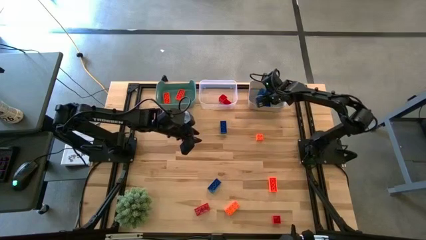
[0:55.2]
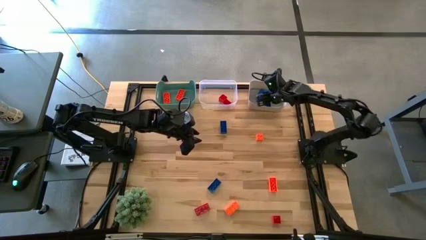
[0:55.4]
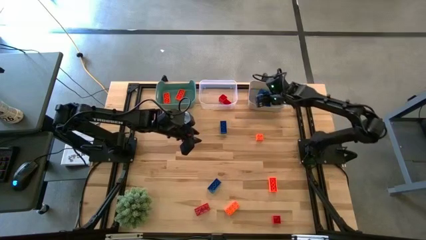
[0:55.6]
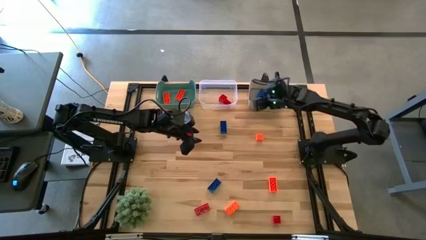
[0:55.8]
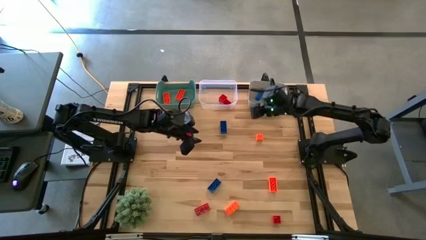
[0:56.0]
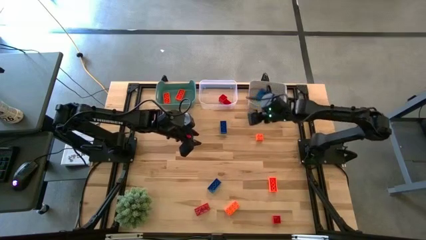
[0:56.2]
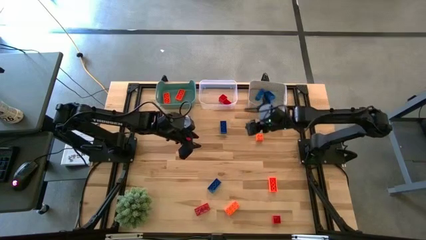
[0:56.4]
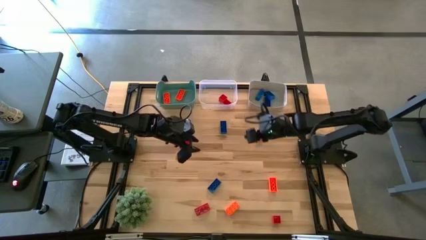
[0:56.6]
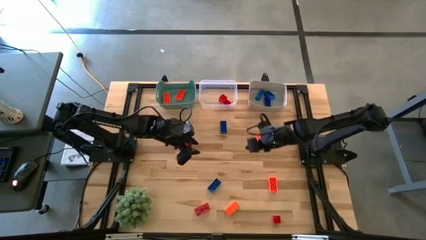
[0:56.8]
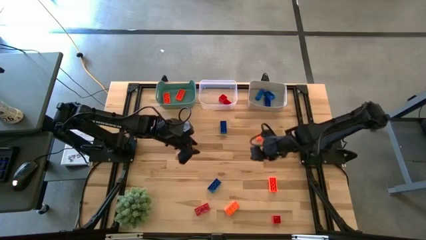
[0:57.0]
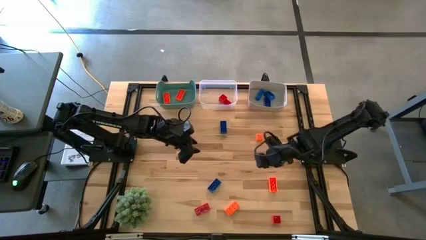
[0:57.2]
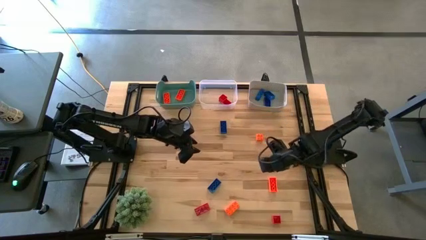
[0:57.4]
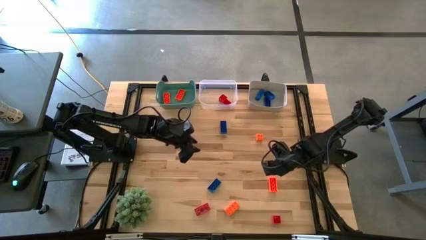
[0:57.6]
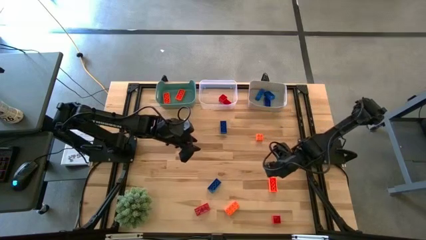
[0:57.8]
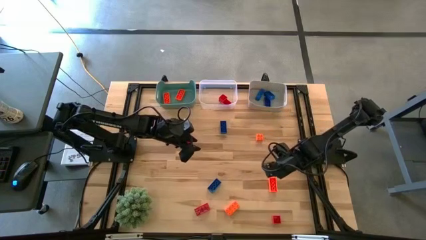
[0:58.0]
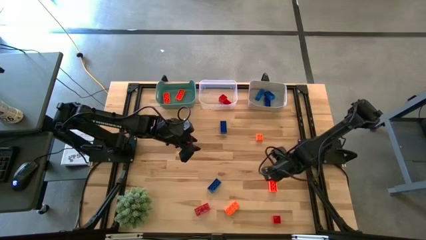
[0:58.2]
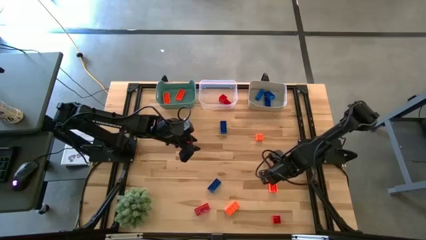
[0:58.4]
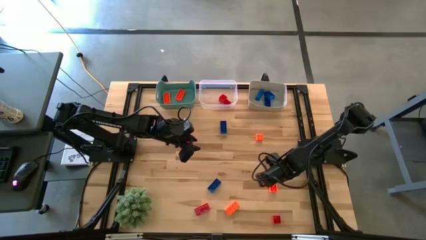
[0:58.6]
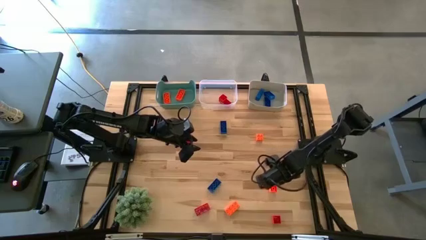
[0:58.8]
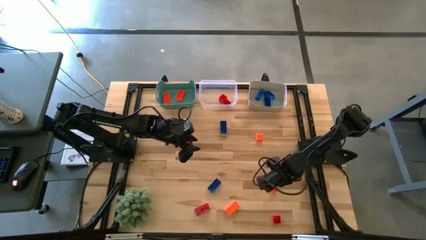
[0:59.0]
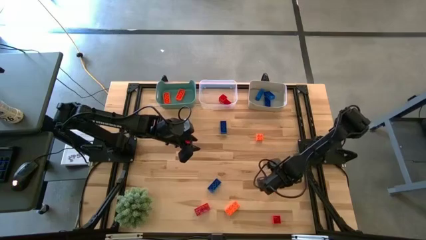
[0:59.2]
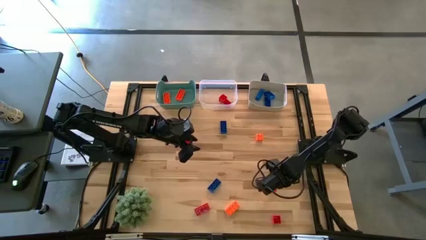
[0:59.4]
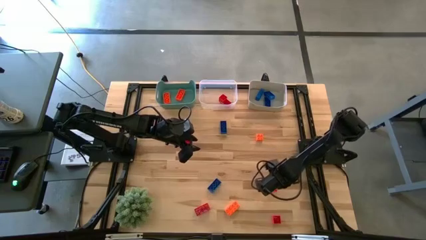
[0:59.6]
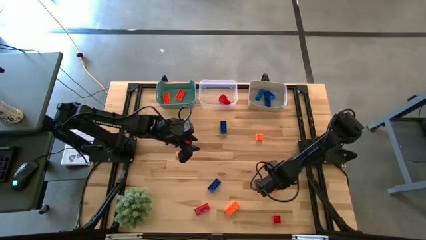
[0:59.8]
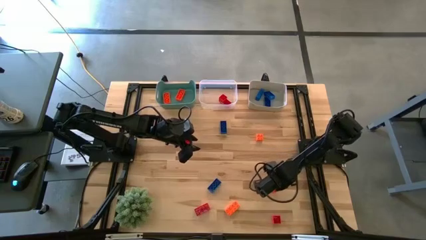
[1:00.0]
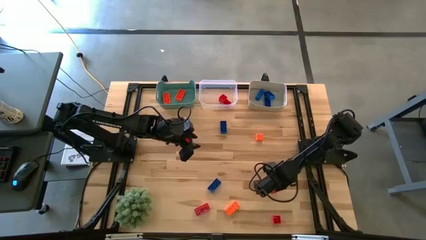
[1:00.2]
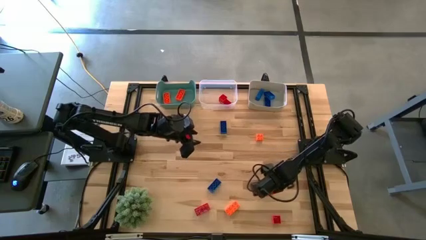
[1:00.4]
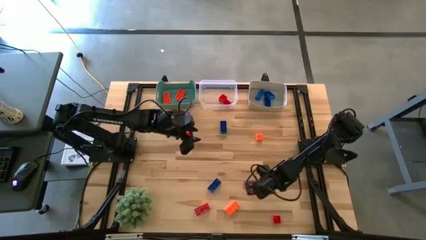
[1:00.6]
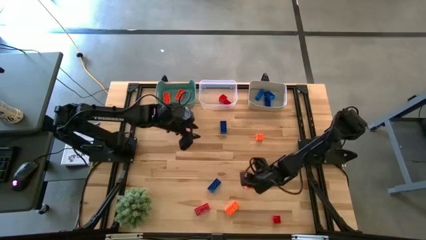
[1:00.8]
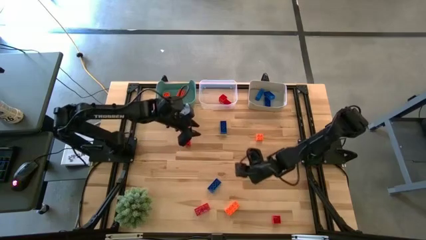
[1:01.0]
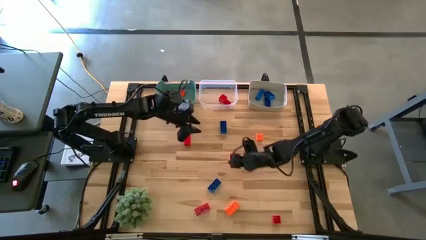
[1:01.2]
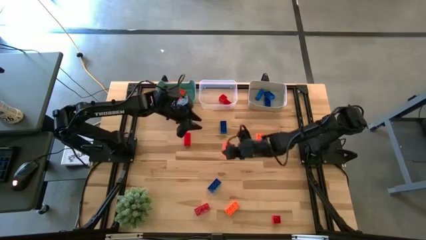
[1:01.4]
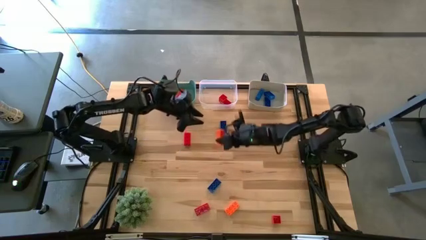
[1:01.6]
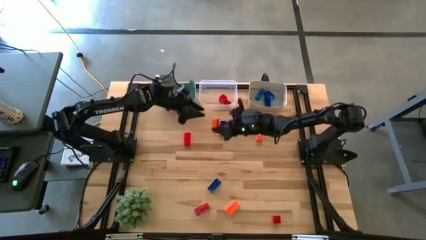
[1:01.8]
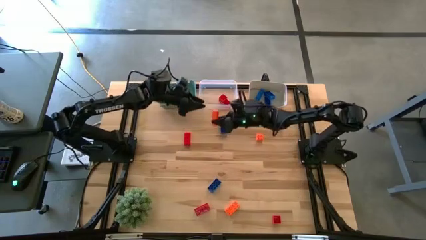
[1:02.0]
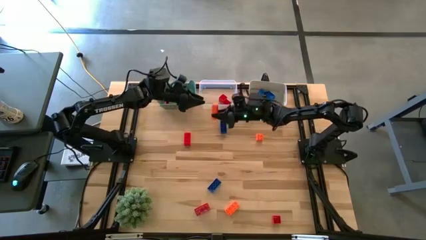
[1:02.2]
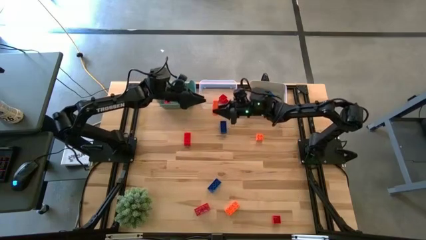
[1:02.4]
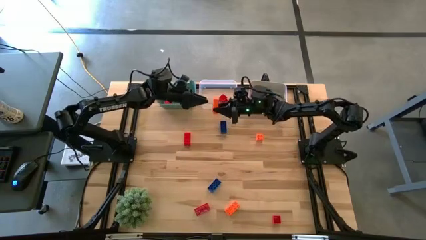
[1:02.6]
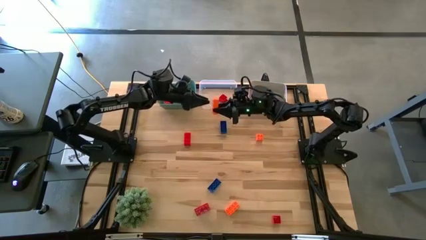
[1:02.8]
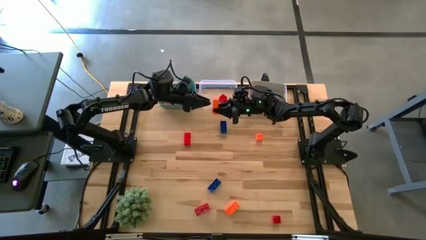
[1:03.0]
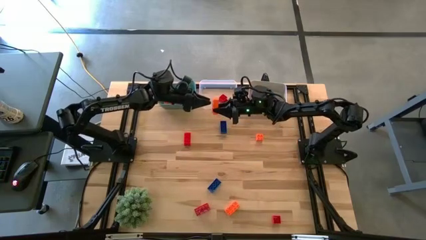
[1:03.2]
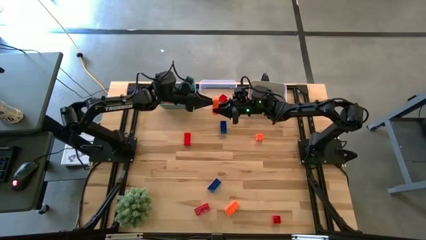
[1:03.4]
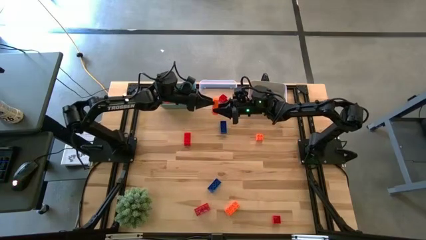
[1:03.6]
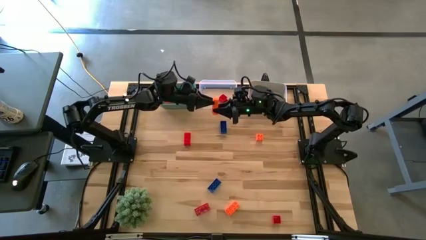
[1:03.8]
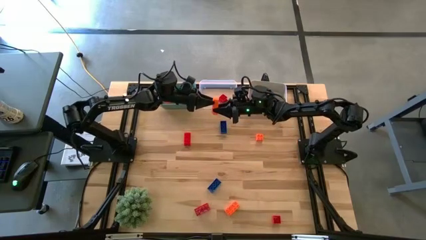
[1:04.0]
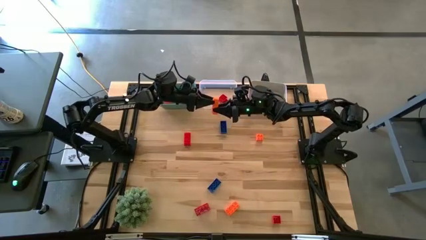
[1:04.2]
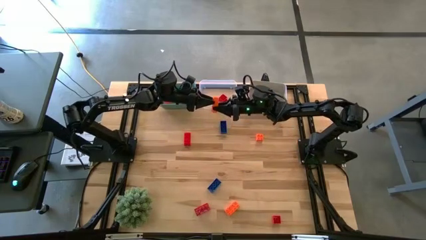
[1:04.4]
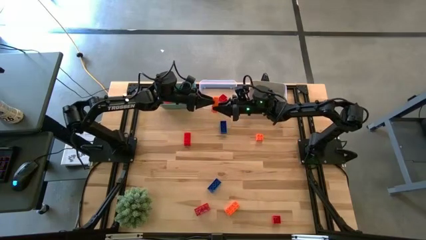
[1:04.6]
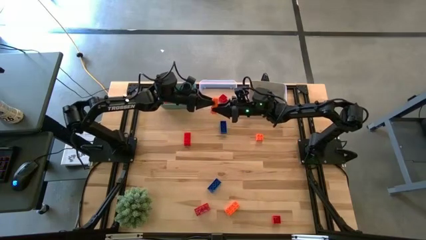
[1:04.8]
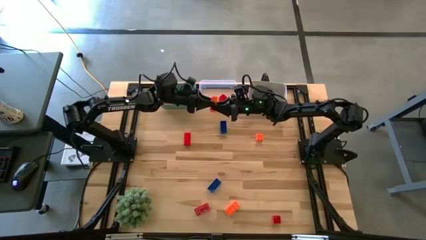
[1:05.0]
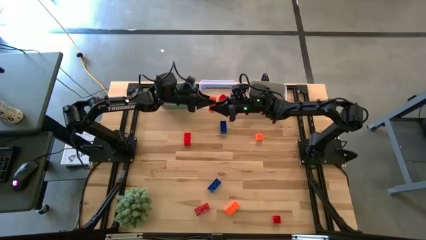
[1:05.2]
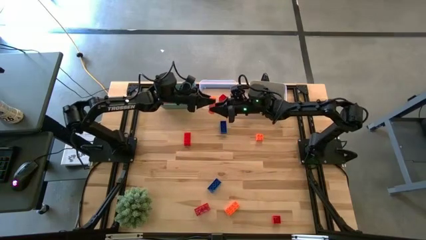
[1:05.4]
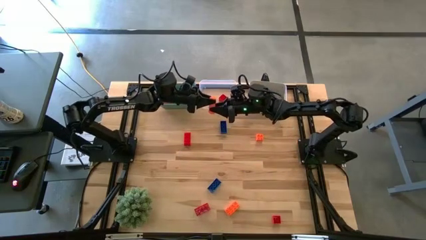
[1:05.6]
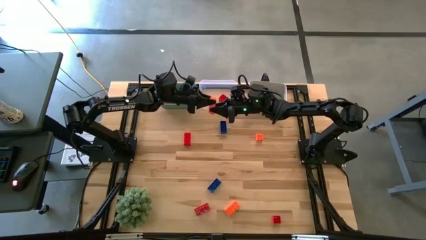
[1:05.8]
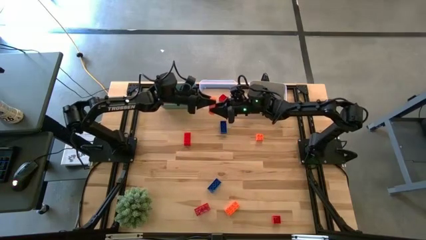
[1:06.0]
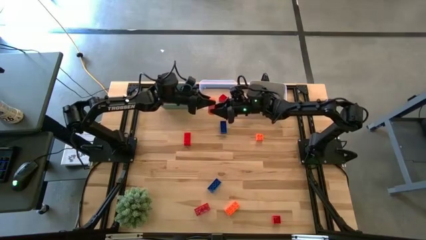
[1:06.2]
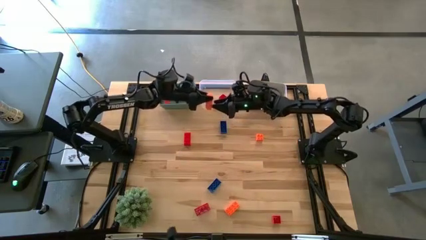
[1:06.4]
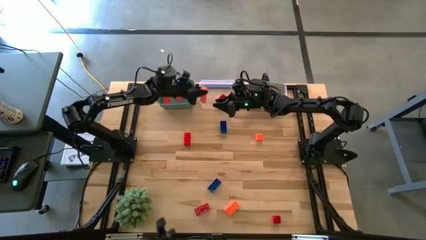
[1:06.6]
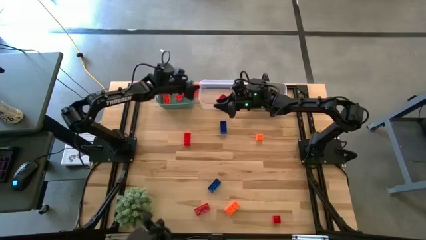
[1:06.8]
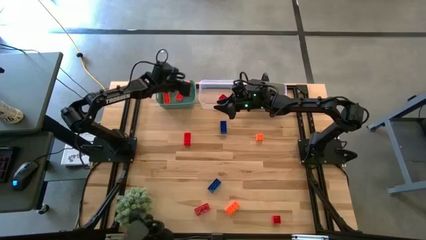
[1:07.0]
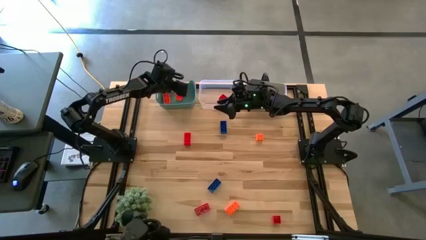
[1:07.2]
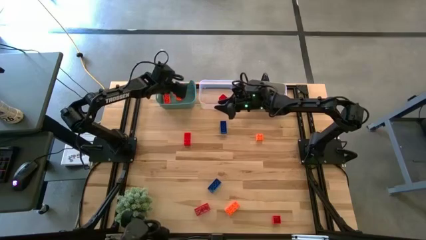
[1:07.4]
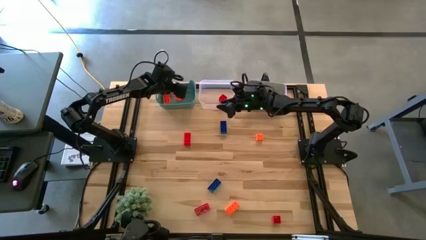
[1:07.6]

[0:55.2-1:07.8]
Task: Sort & place blocks by color
Put the orange game piece into the green bin

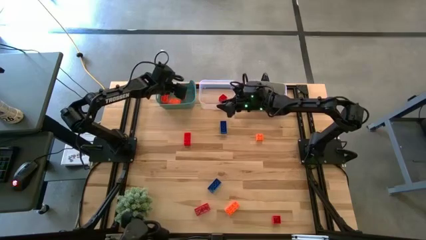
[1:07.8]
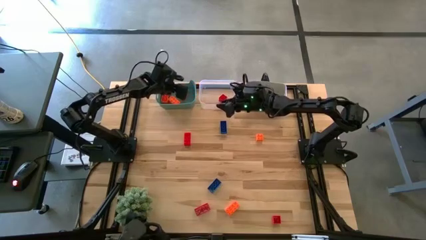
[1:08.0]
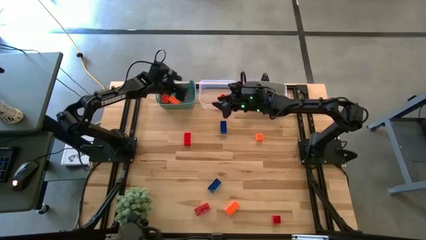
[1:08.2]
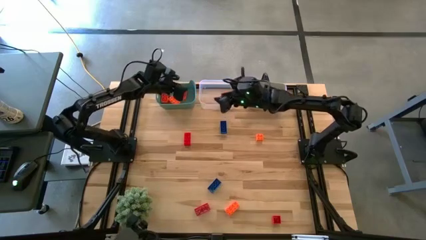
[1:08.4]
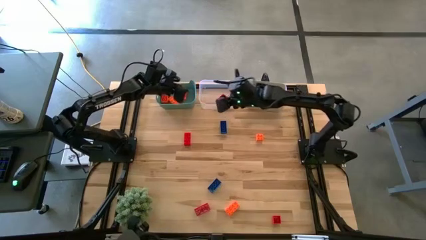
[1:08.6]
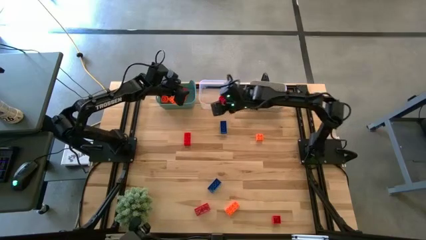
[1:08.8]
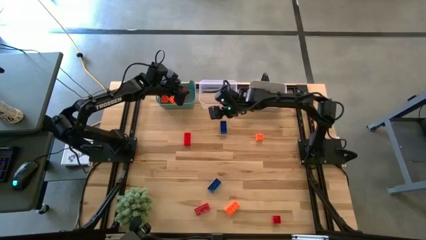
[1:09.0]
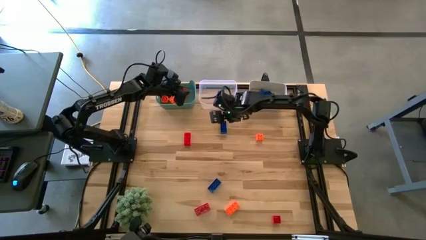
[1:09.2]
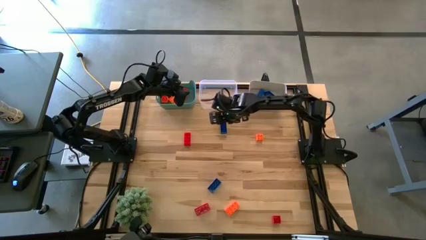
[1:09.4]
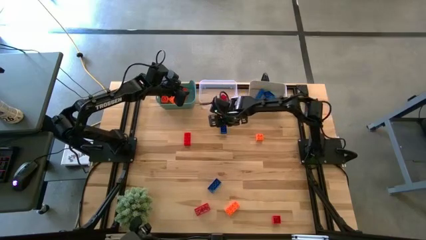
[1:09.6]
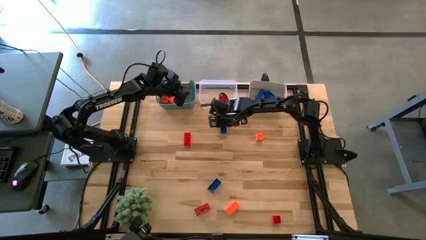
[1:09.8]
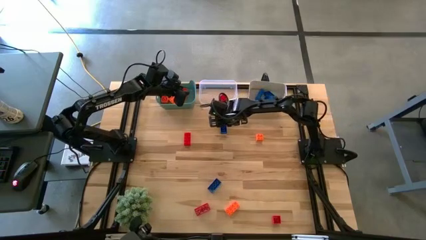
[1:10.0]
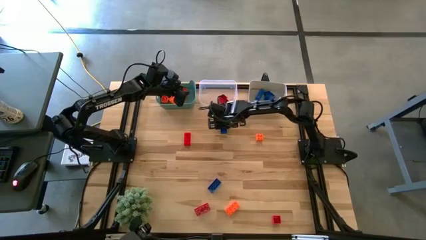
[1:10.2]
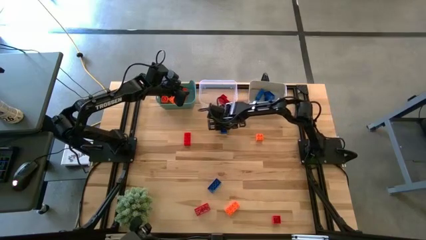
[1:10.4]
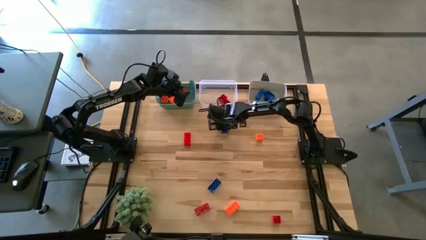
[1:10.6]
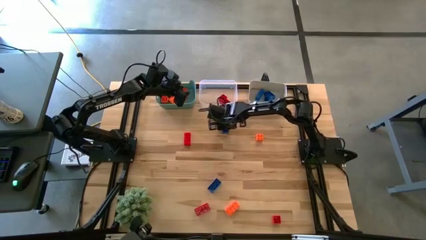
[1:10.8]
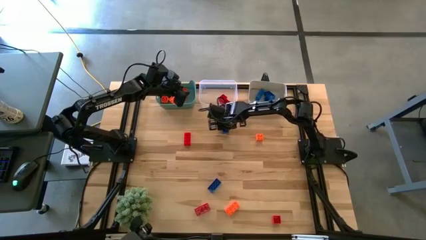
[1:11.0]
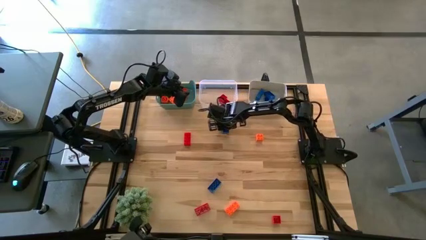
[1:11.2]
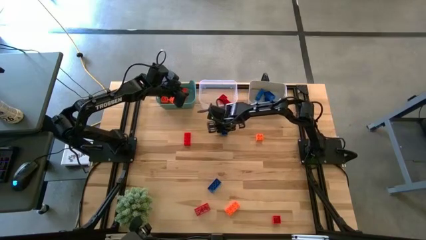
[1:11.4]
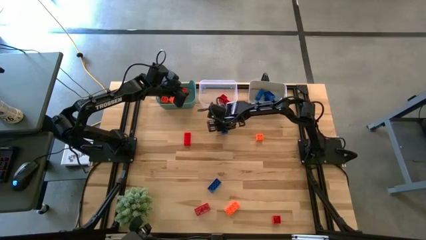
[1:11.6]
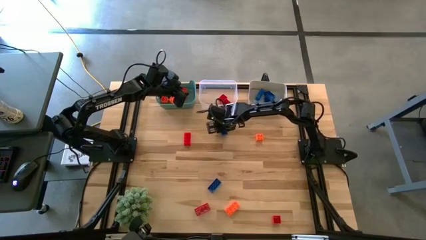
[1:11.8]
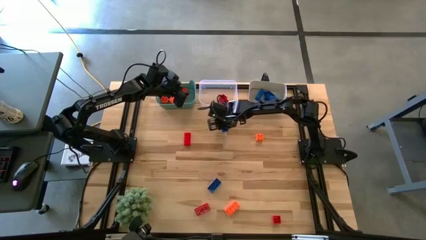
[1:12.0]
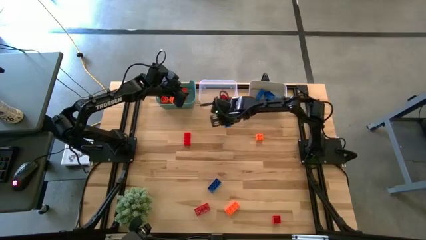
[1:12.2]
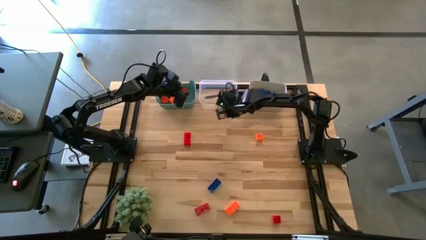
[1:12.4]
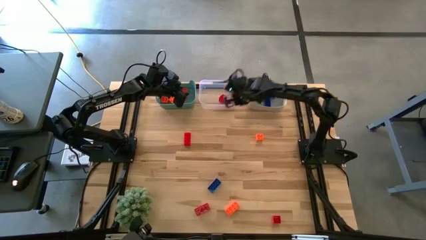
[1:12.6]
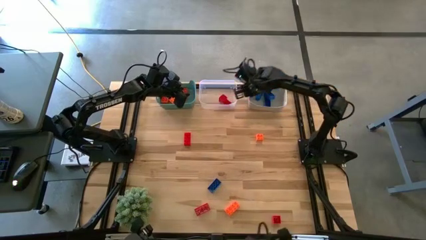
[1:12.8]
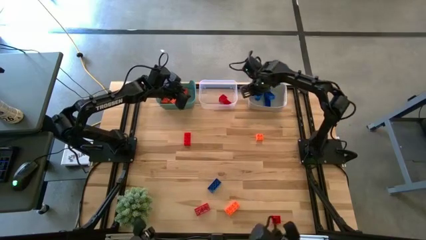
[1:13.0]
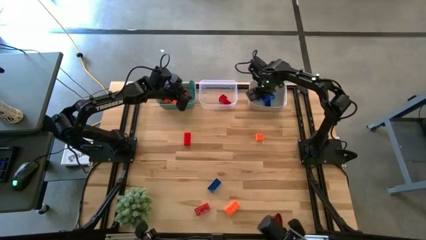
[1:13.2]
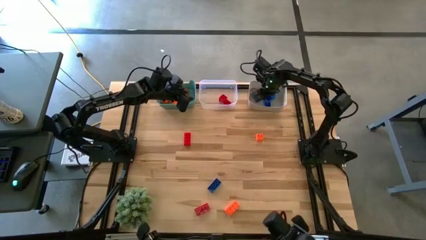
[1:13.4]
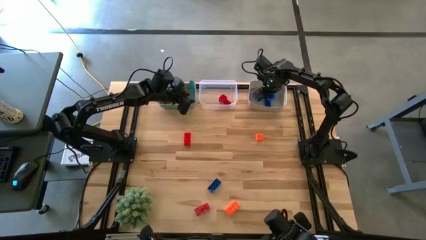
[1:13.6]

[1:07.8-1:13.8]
Put the blue game piece into the gray bin
